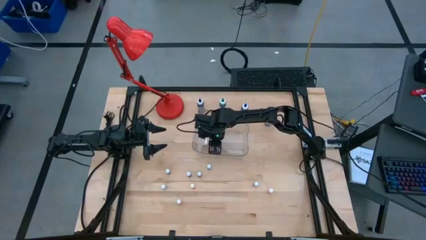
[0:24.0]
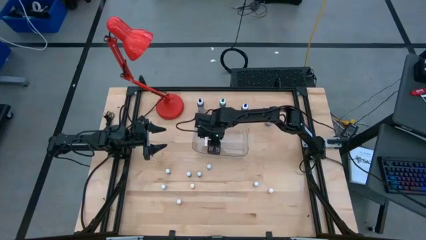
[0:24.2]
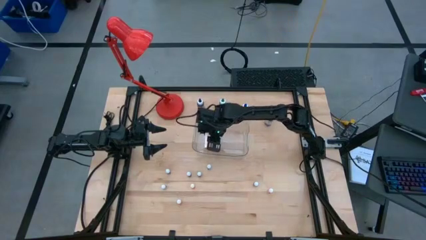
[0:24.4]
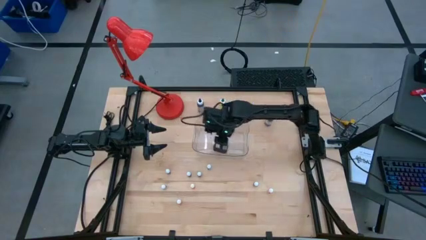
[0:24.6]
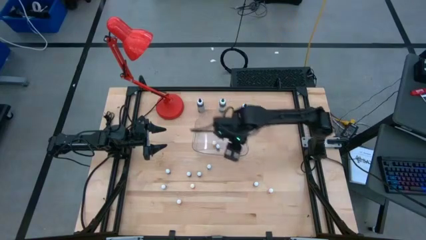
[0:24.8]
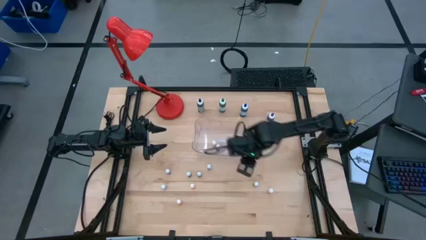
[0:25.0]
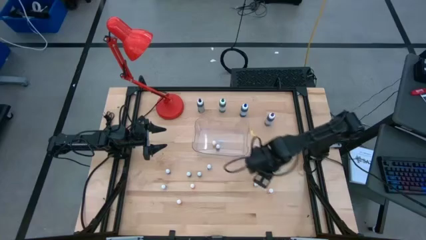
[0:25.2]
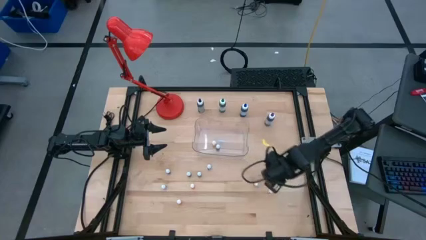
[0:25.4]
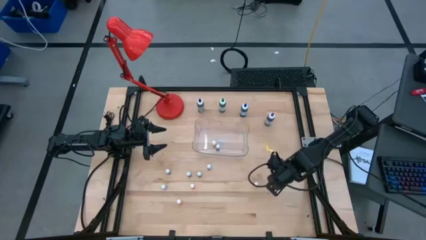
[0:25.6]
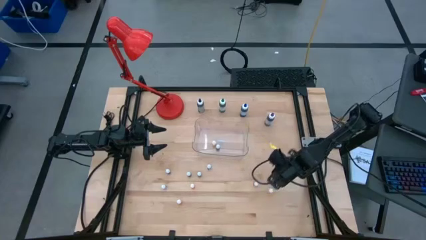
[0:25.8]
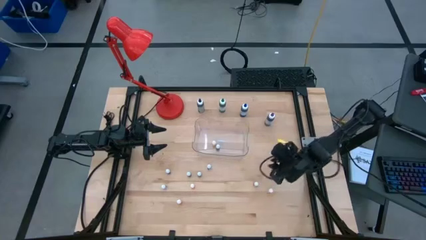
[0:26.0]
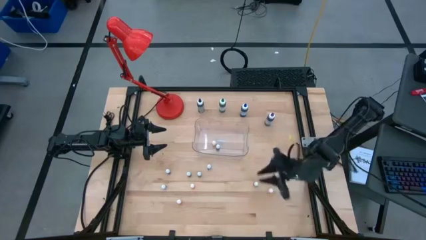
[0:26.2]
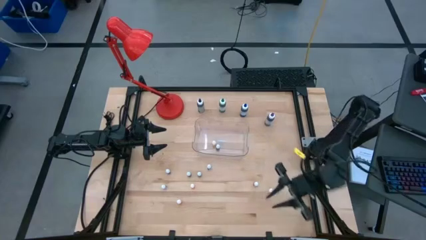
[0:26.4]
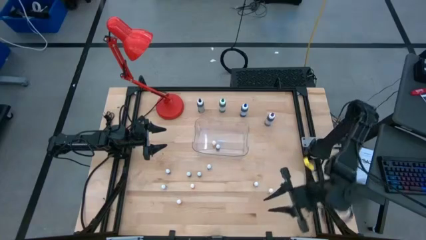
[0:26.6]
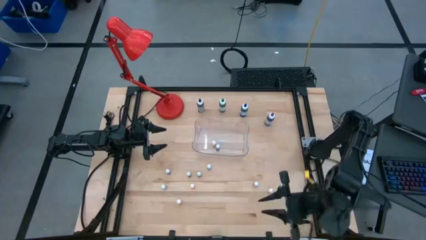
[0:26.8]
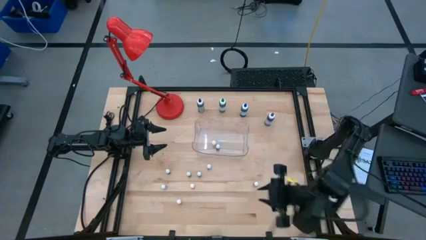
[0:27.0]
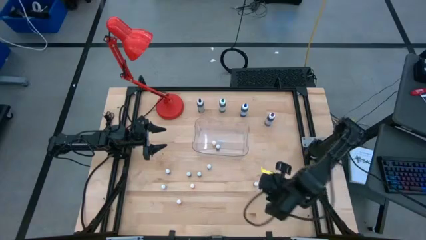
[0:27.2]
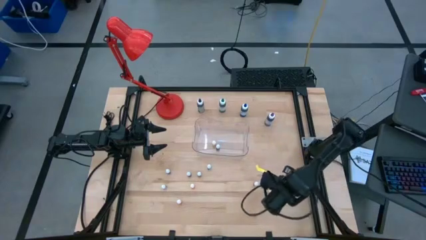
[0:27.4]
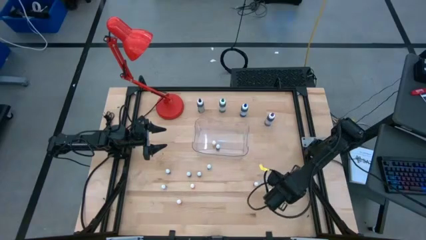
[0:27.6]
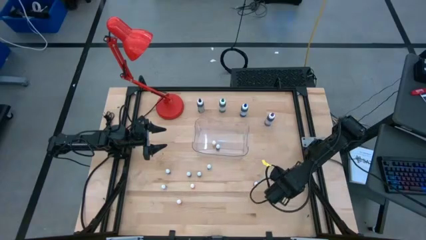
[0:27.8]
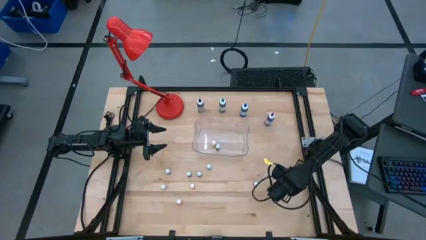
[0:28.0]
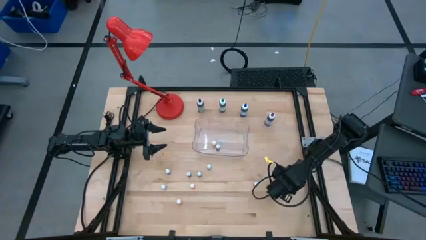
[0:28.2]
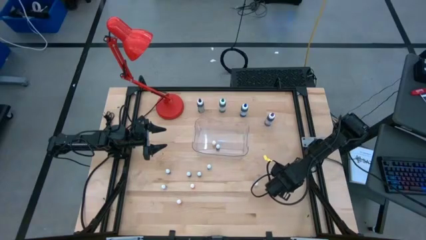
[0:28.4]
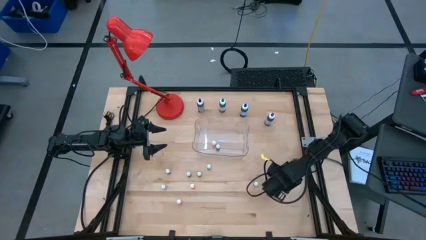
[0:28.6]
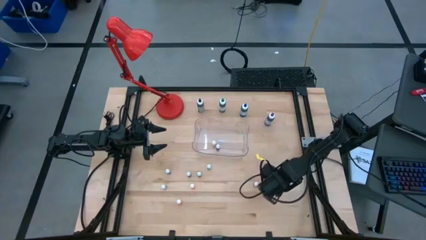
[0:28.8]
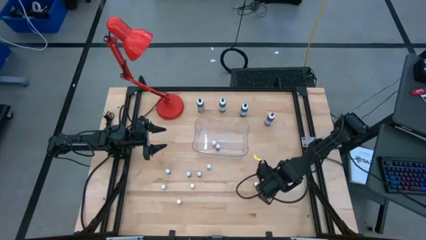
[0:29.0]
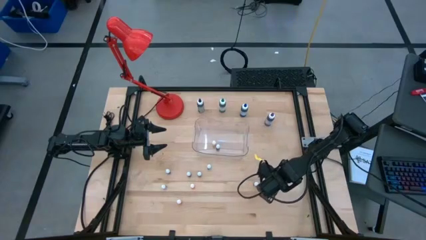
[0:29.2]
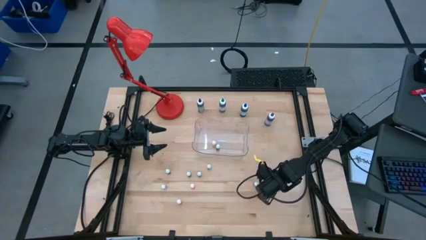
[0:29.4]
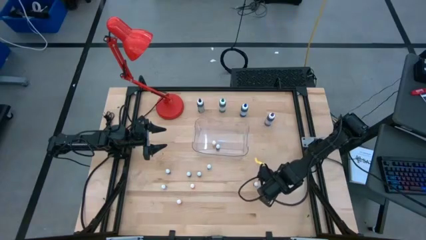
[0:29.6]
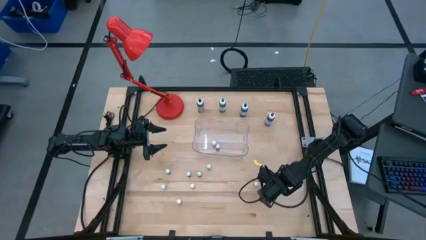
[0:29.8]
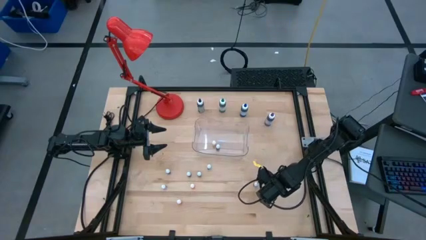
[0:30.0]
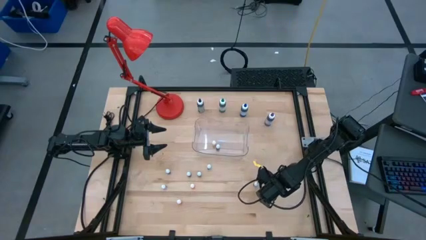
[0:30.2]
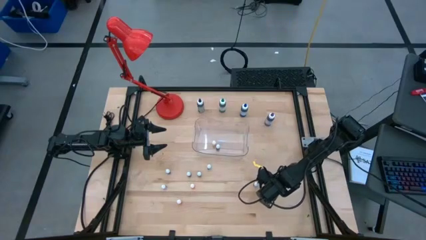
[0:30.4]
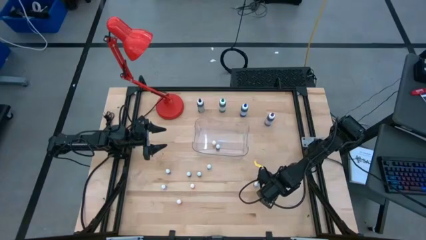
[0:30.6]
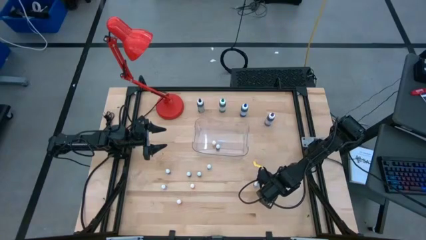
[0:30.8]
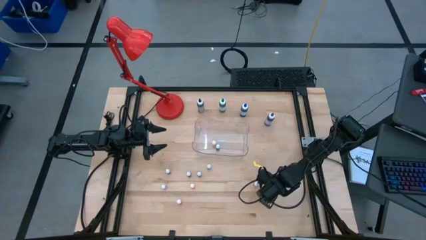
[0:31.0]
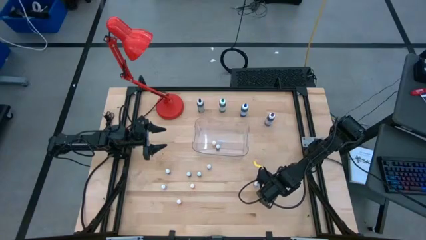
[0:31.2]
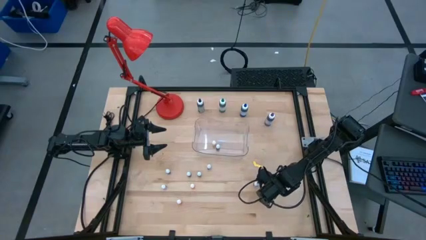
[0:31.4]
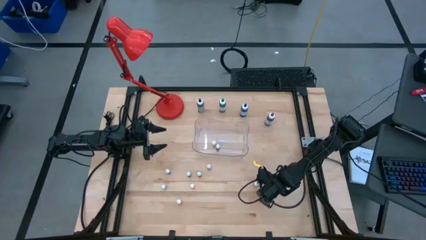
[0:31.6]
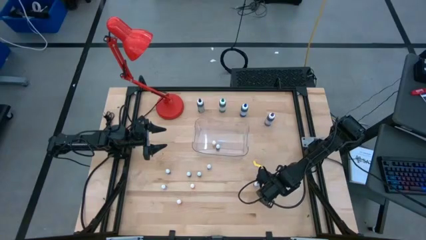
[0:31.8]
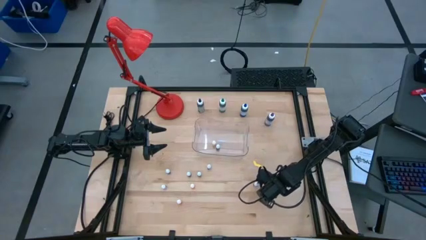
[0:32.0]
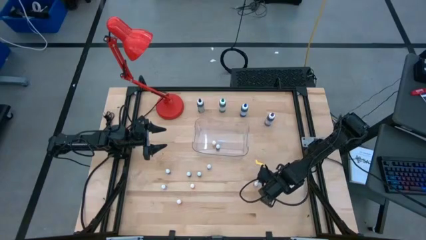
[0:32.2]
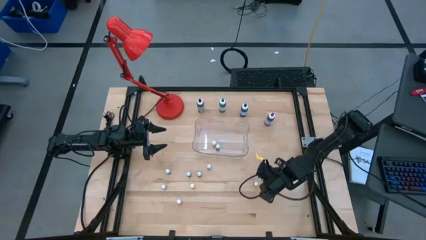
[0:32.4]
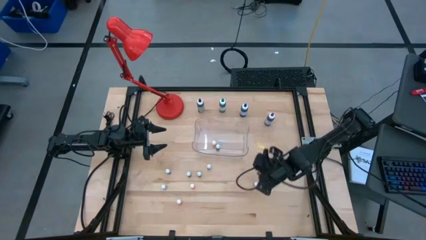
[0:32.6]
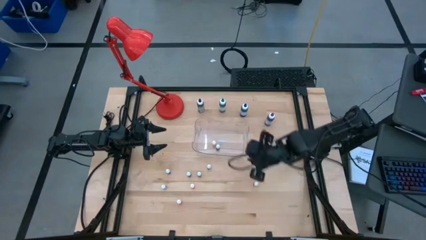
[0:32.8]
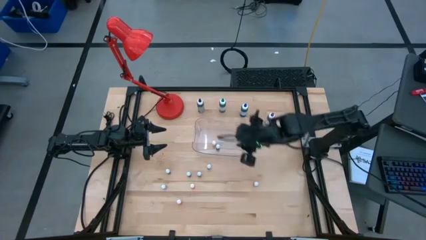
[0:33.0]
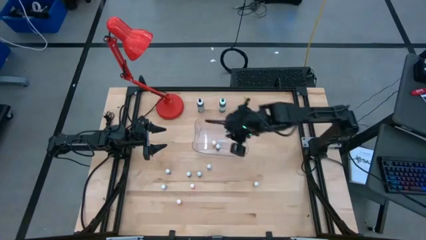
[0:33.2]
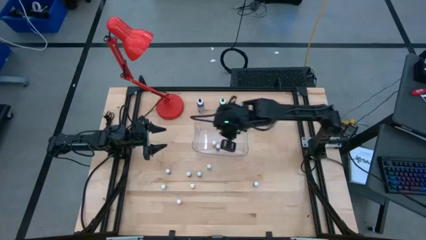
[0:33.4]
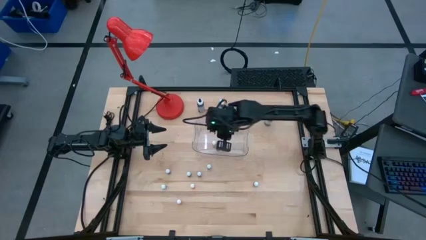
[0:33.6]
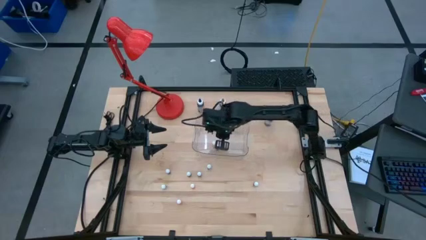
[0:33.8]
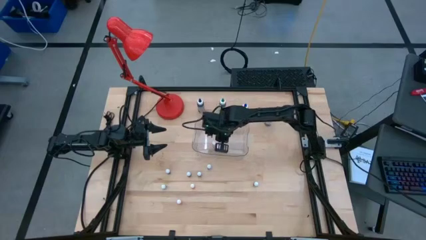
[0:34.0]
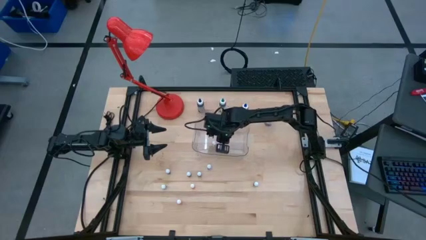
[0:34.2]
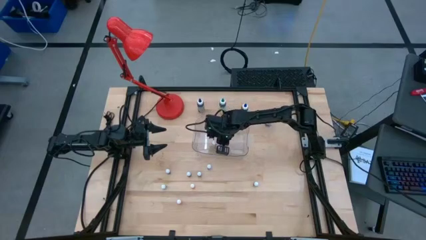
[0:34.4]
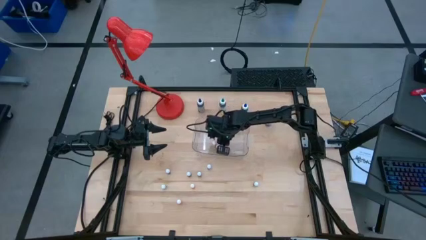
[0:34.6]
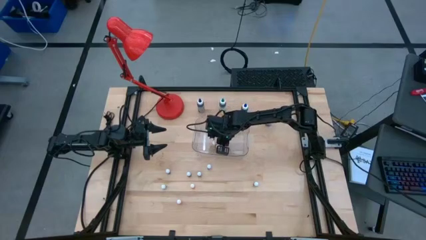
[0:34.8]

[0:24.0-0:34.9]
Task: Pick & Place food coloring
Put the small orange food coloring bottle in the transparent bin

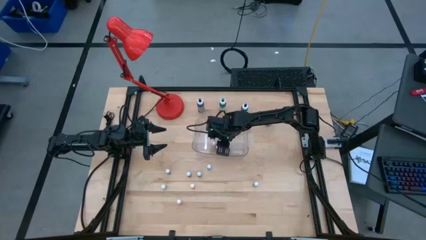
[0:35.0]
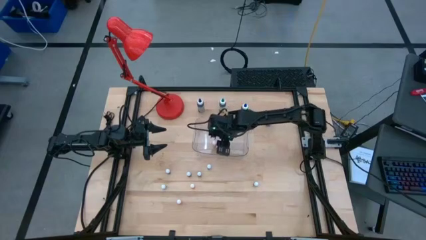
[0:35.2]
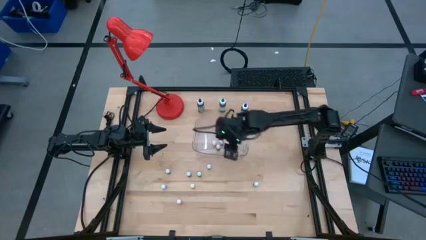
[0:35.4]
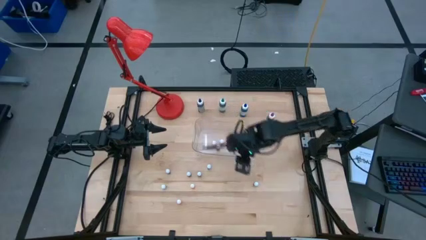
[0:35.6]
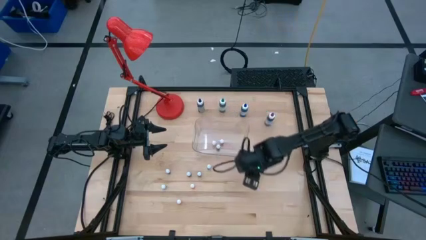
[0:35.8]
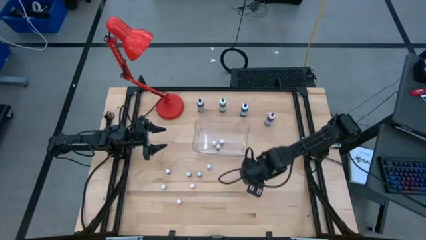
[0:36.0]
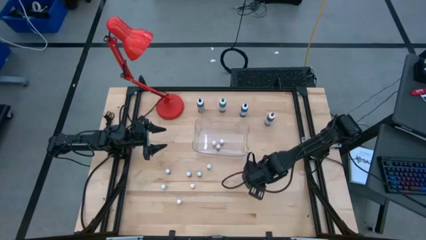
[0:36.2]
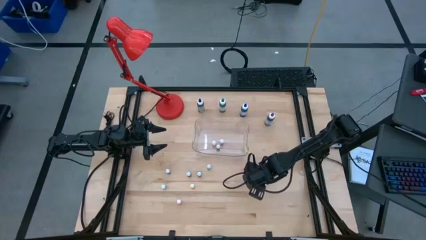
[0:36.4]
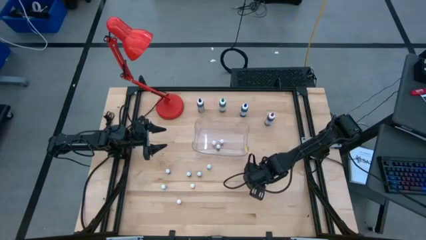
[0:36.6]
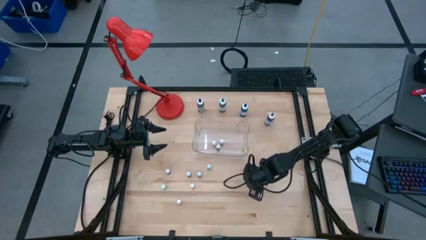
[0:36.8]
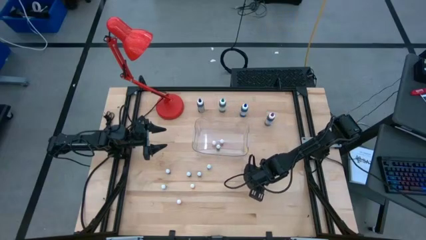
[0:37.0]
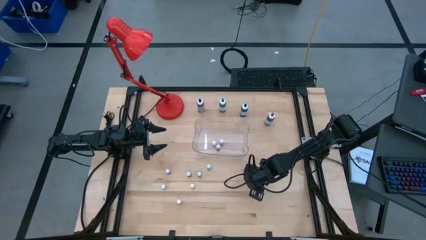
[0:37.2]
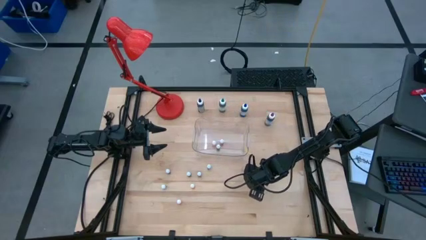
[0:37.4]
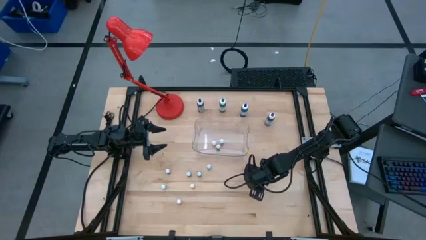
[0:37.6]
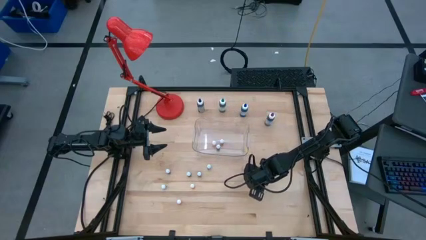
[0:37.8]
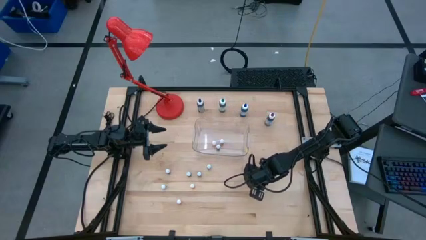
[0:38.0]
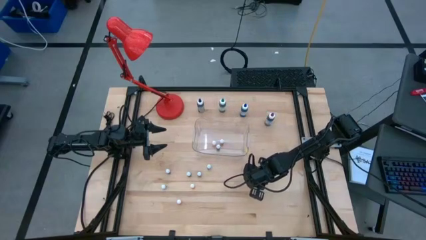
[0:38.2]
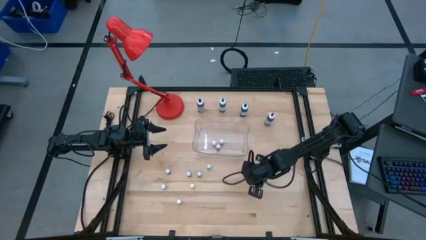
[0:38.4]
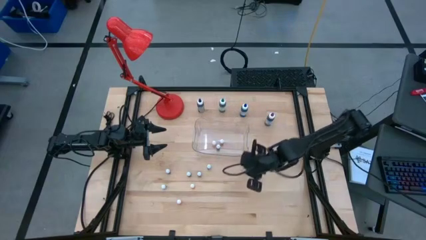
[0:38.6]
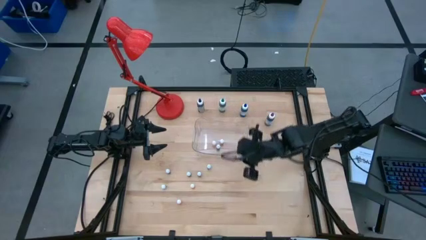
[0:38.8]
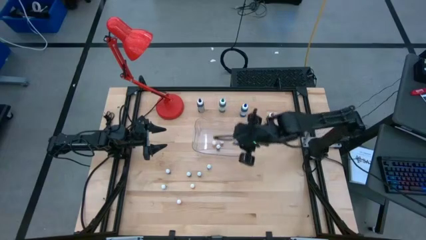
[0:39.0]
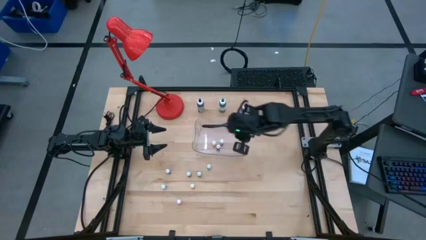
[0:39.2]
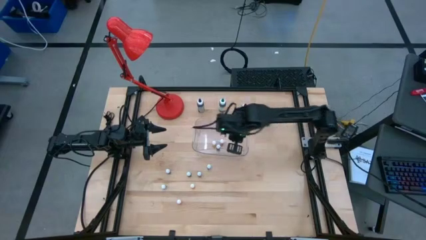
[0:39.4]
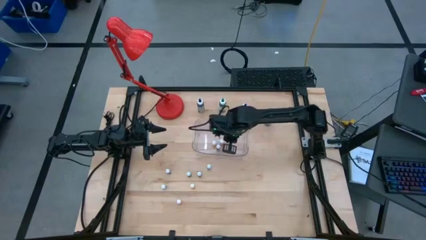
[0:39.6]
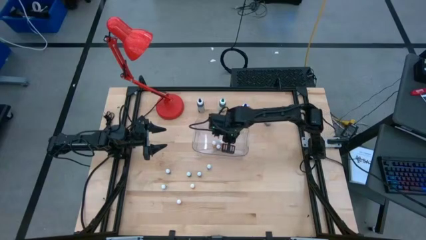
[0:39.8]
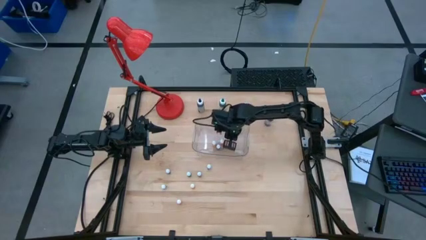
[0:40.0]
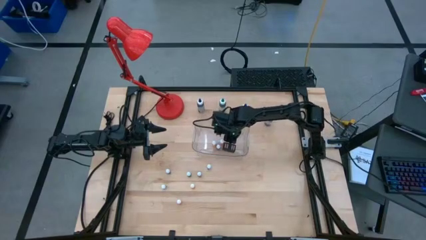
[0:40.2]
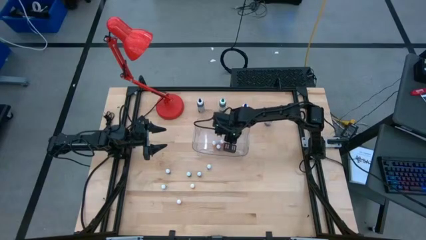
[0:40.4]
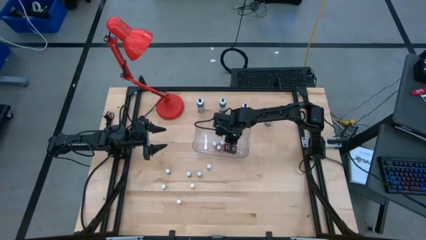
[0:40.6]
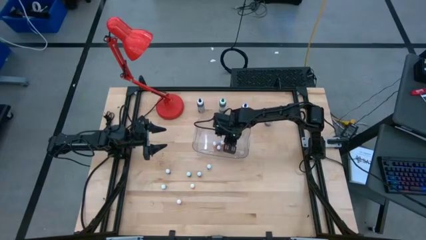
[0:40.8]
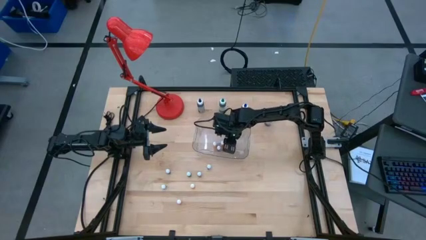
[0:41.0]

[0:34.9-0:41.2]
Put the small red food coloring bottle in the transparent bin
